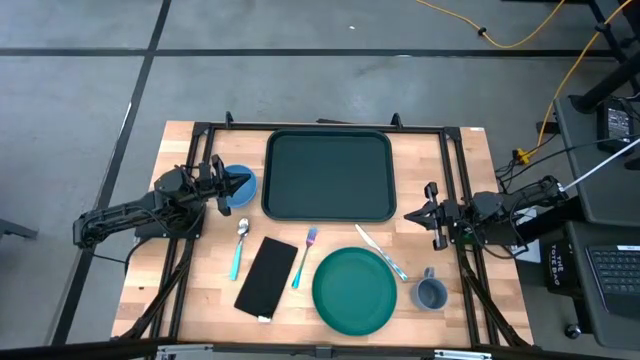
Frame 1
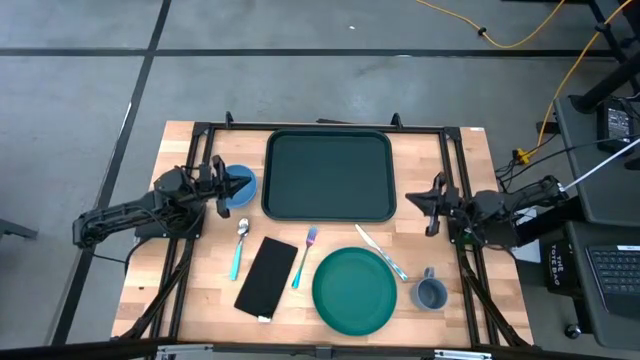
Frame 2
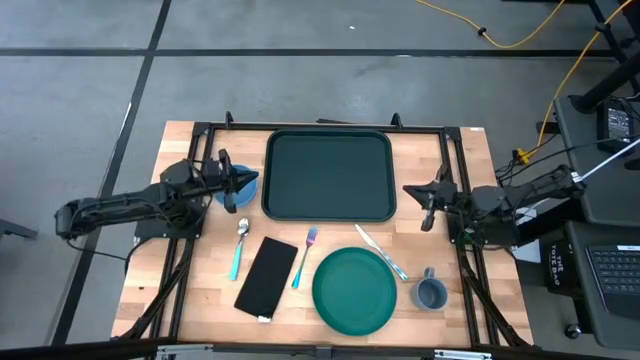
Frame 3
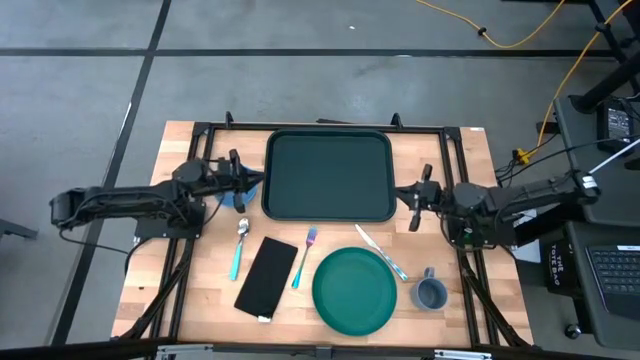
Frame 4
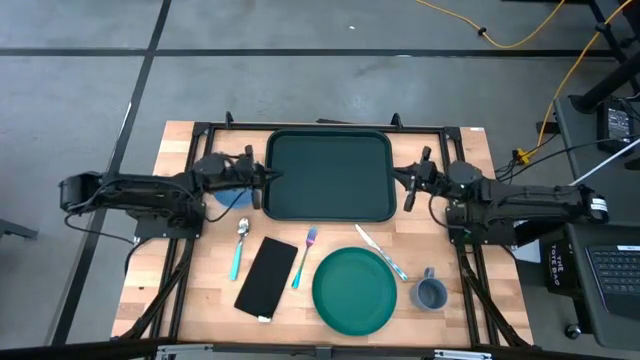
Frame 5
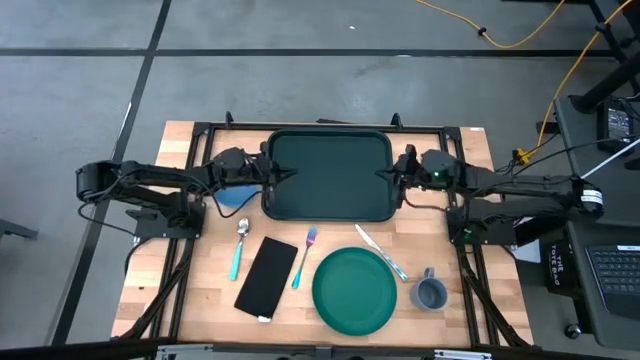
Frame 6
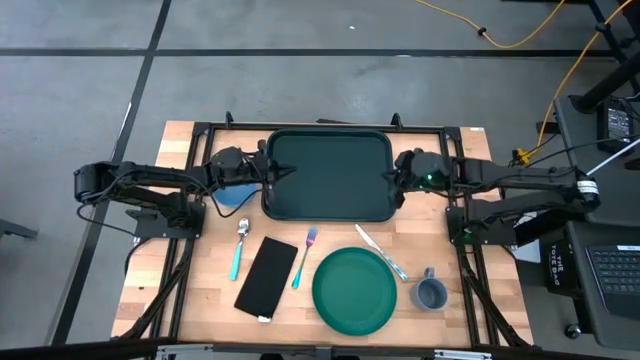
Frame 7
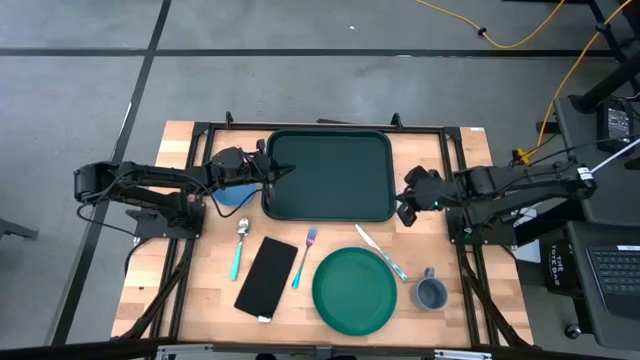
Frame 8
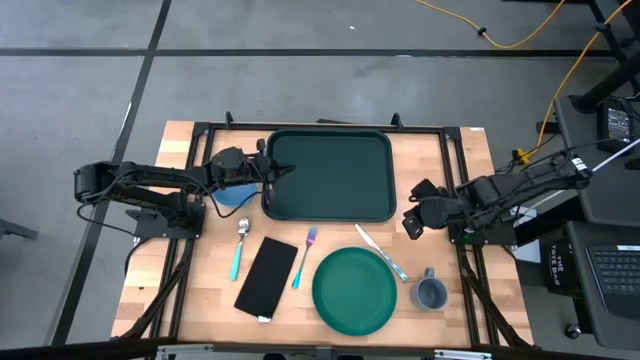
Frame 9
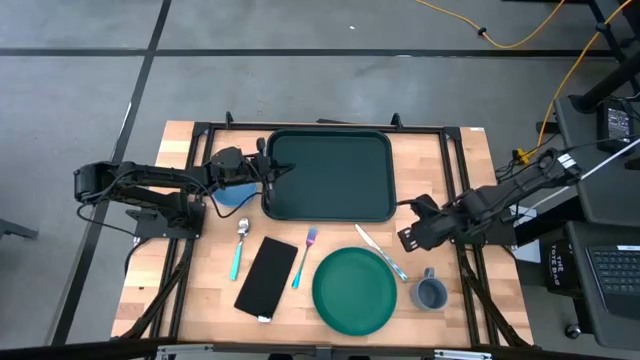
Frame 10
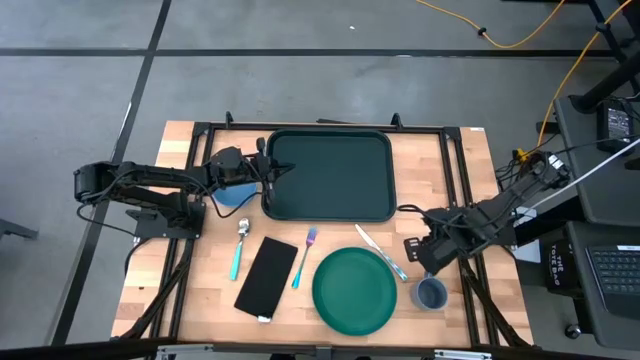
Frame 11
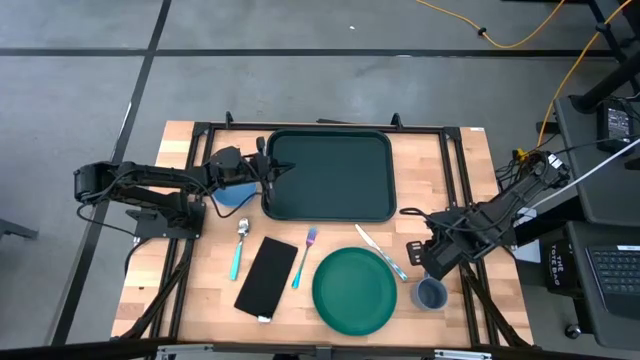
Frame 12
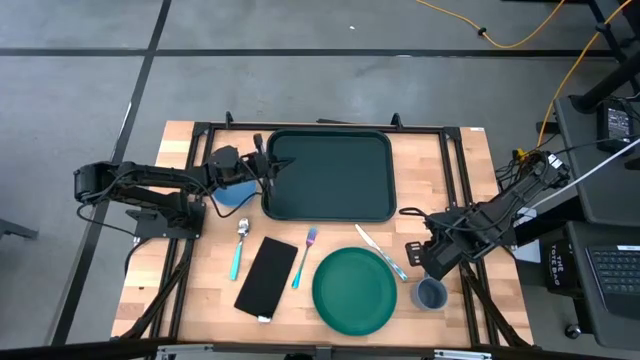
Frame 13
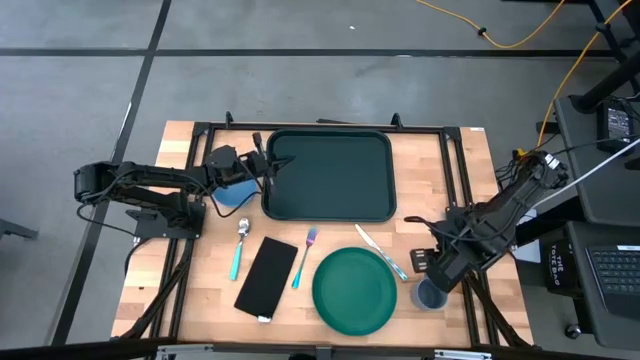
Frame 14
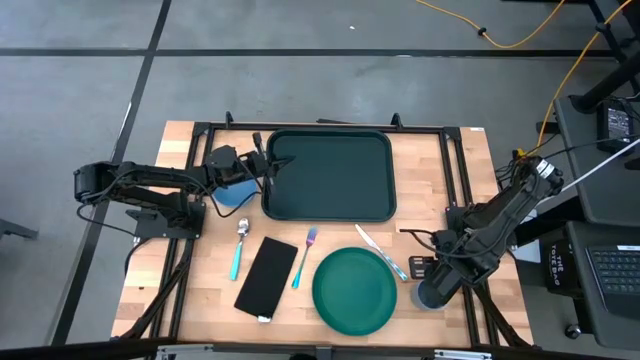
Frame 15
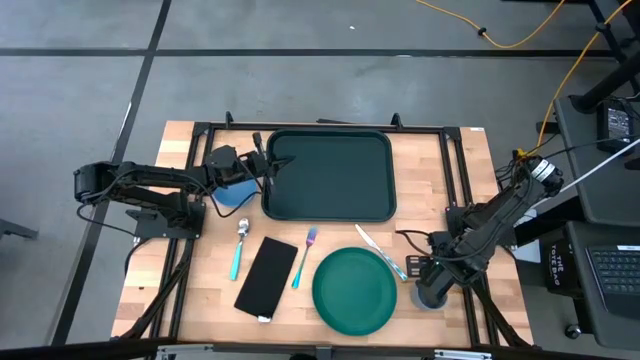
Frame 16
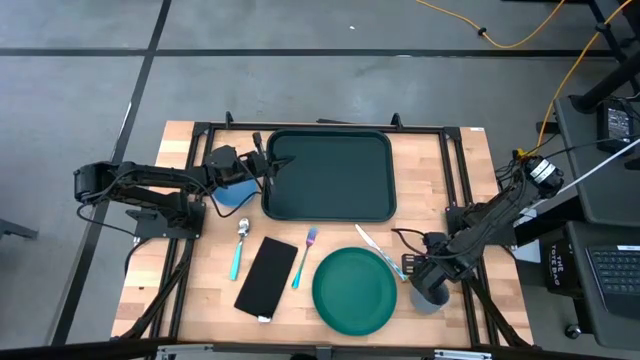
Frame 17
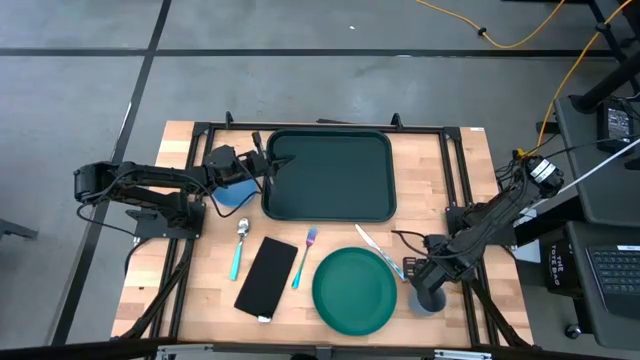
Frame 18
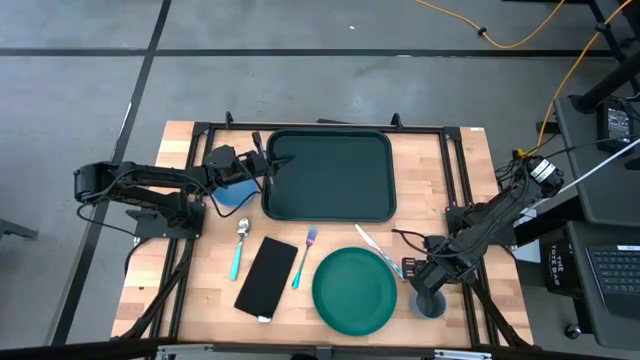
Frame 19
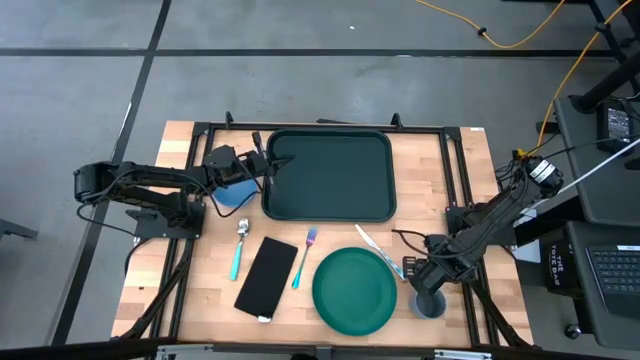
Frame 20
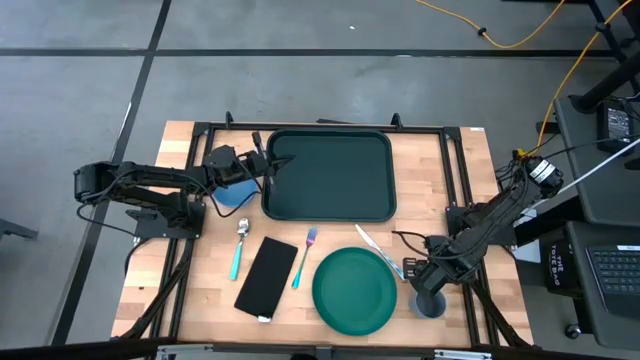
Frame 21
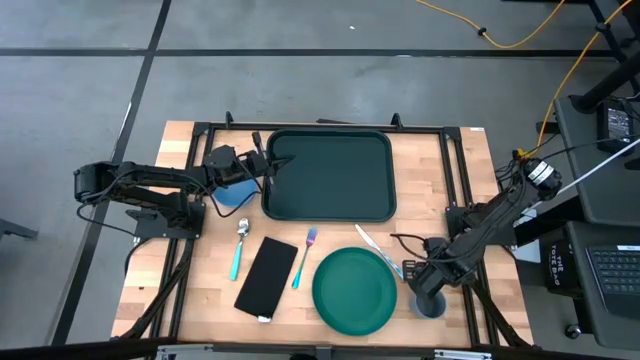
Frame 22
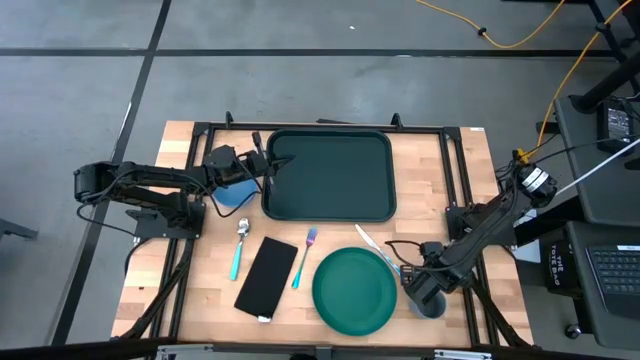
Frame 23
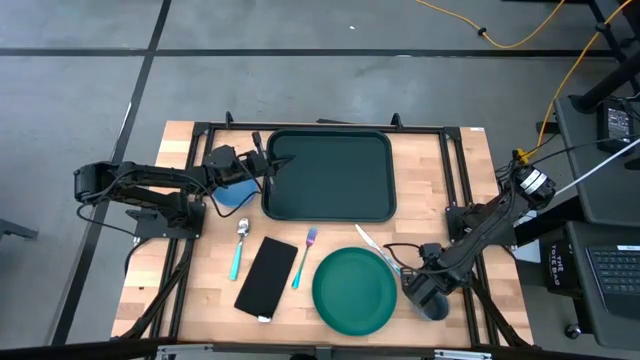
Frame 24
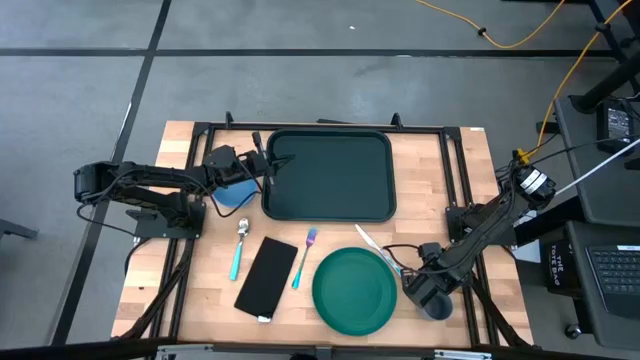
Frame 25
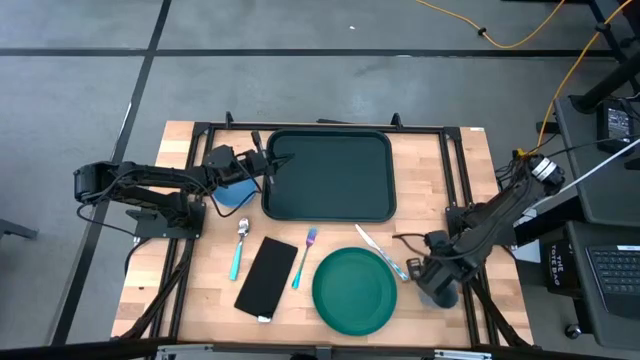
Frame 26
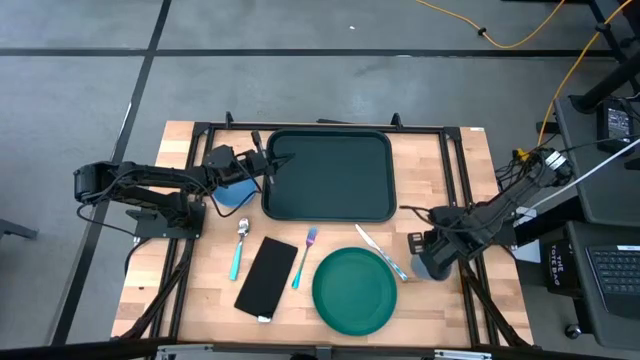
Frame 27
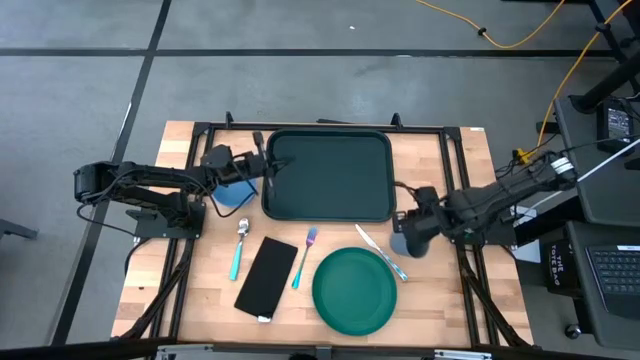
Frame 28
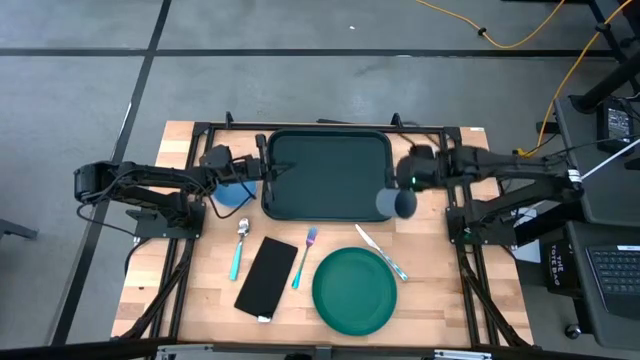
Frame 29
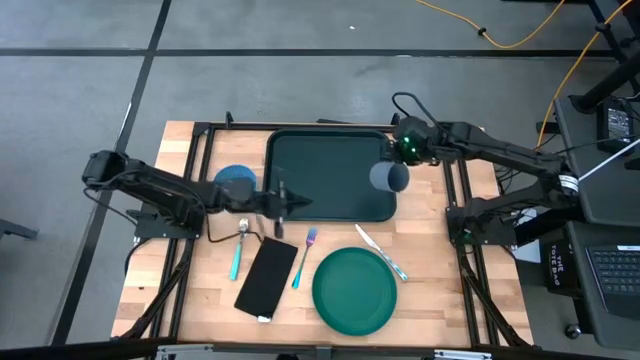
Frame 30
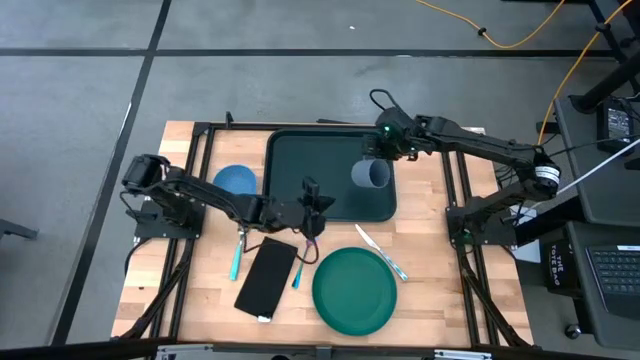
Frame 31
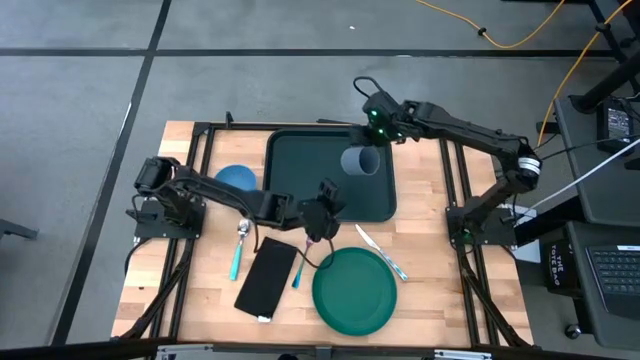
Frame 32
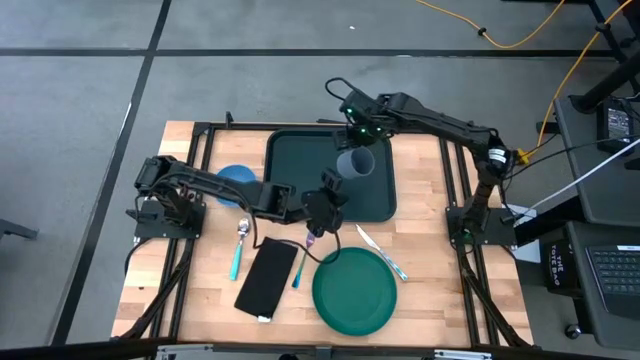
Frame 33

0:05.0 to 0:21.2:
Task: Set up tray
Put the gray cup on the top left of the black serving tray
